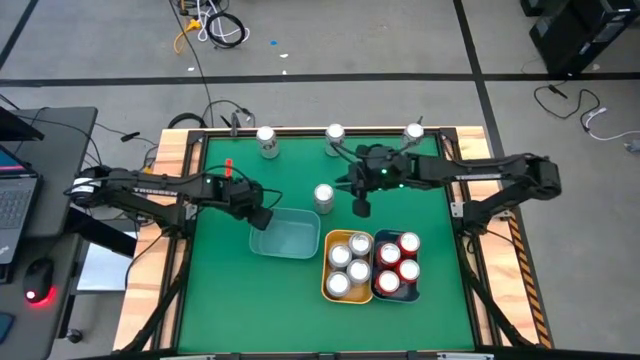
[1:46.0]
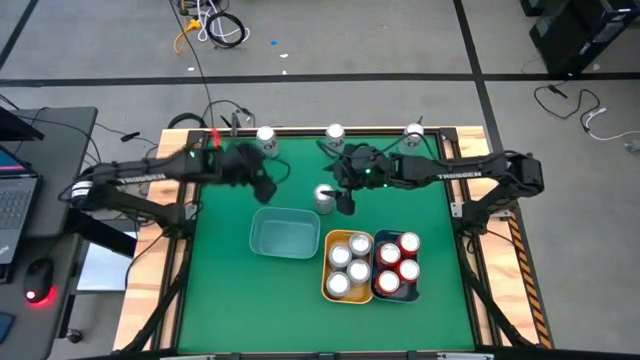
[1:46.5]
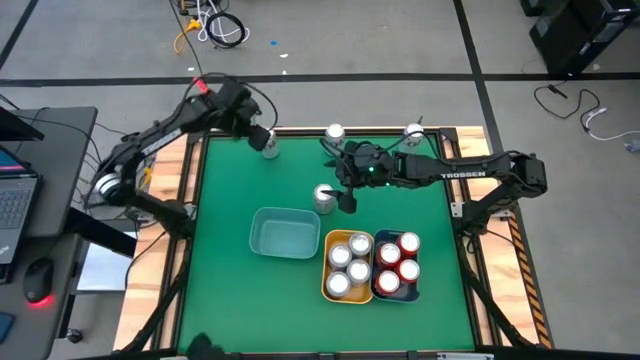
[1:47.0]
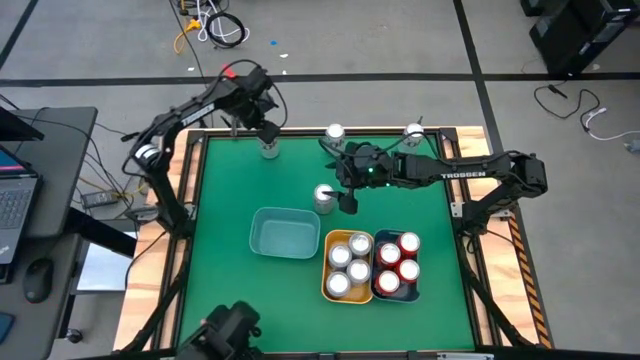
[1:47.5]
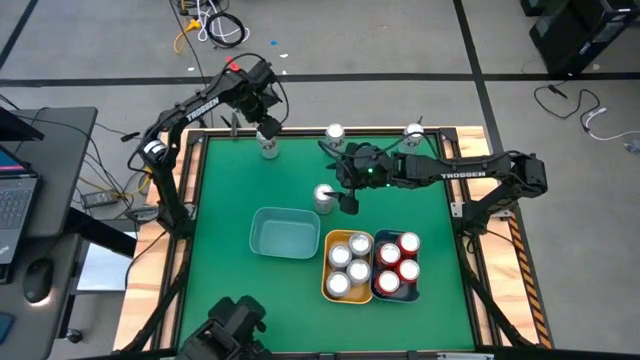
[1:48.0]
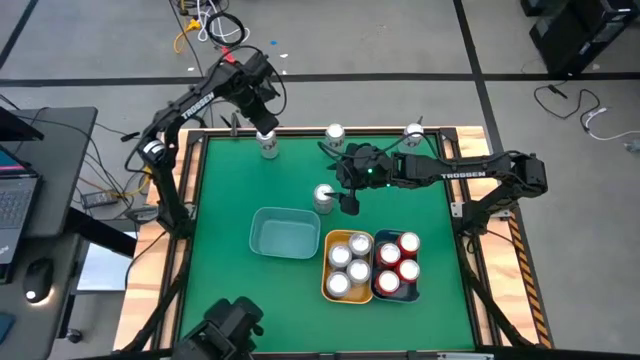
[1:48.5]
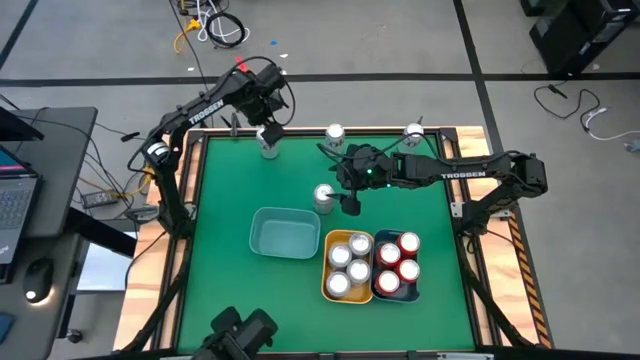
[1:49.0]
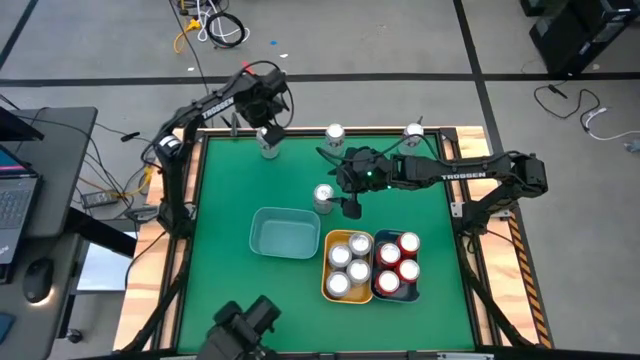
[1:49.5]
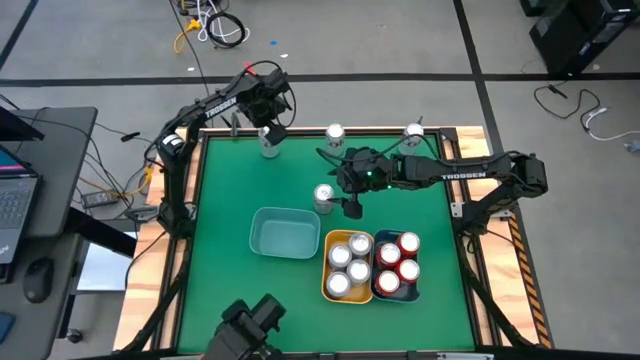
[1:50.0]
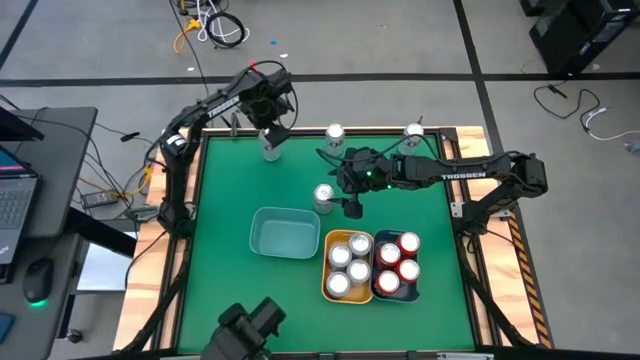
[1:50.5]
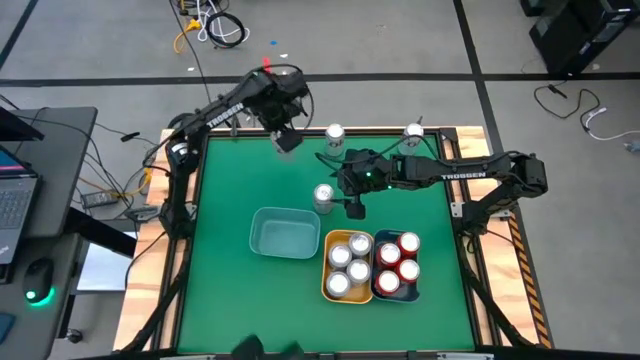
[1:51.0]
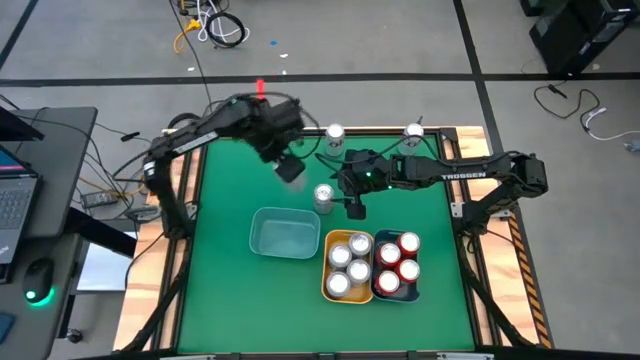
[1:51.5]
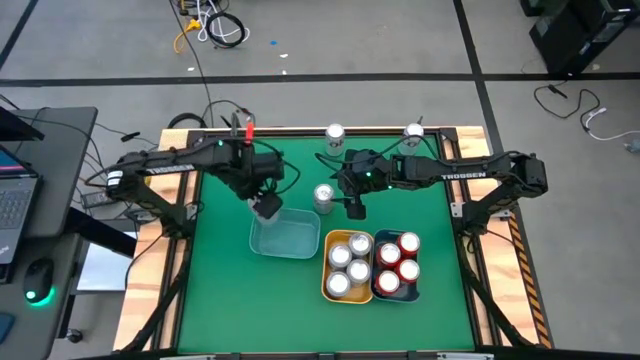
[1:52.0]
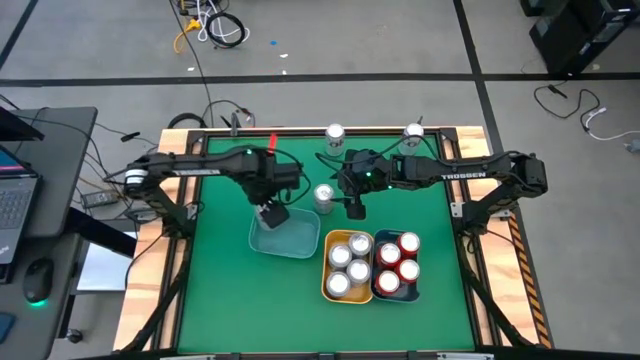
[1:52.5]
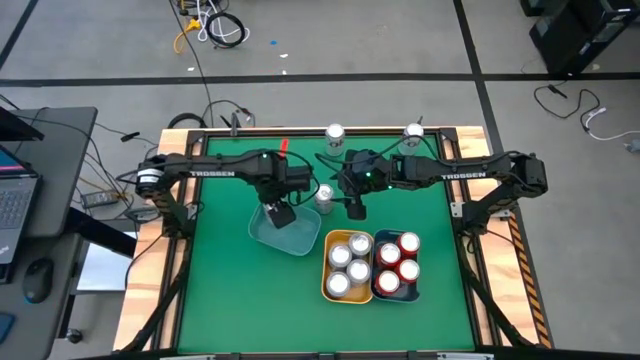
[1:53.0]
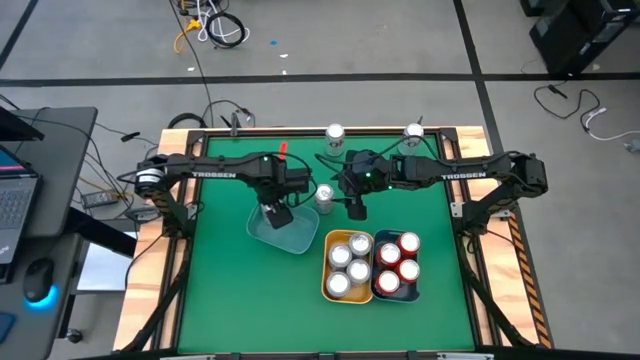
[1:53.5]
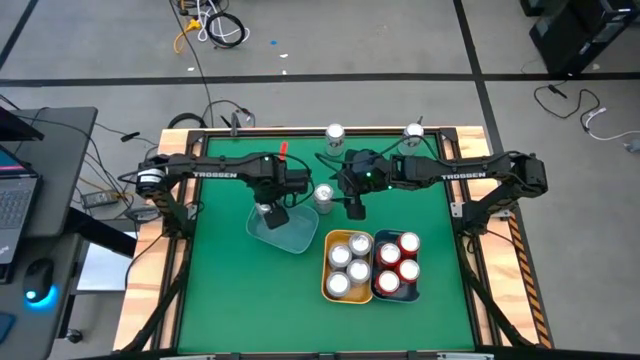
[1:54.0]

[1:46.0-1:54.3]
Task: Sort soda cans
Put the silver soda can into the green bin

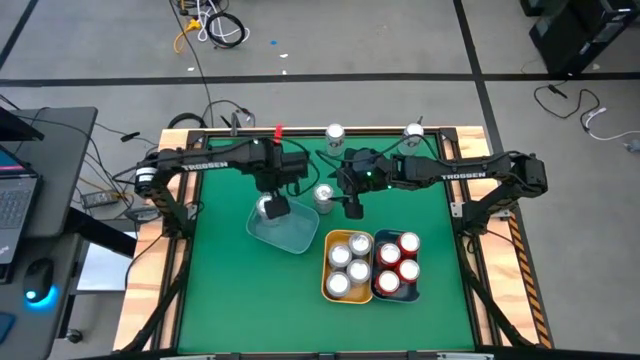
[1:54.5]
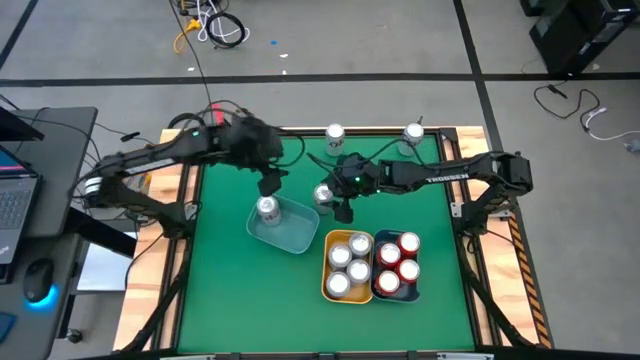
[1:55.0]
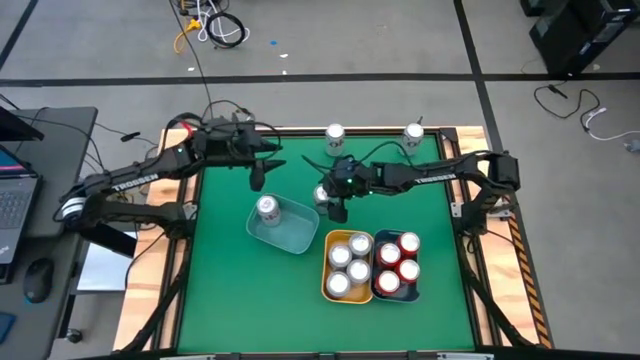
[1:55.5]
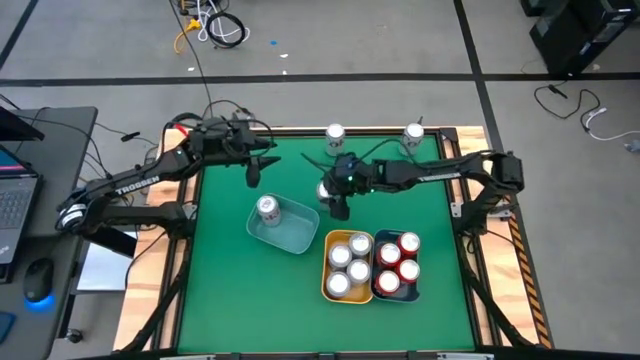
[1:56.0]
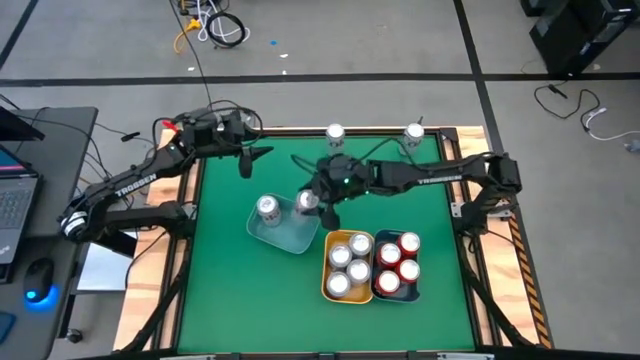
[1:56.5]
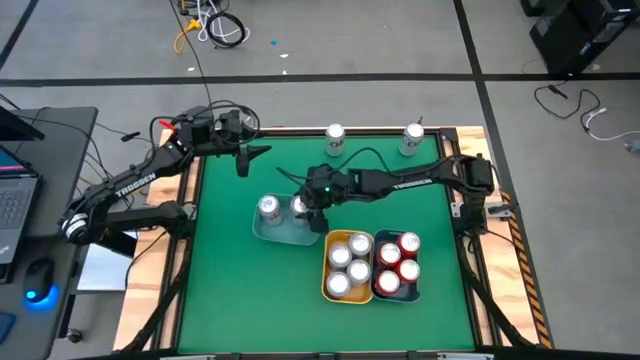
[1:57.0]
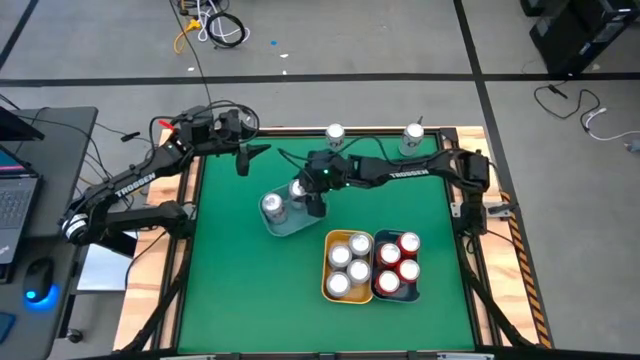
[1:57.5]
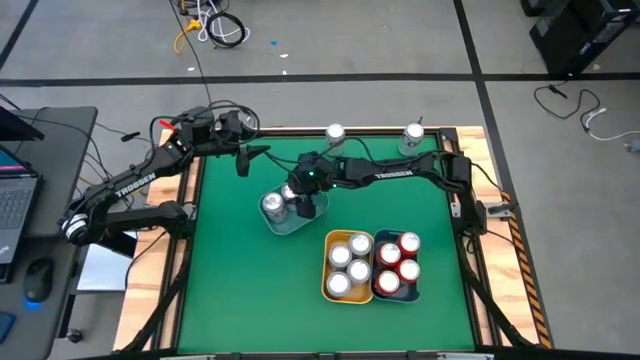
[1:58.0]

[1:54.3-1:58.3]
Put the silver soda can into the green bin

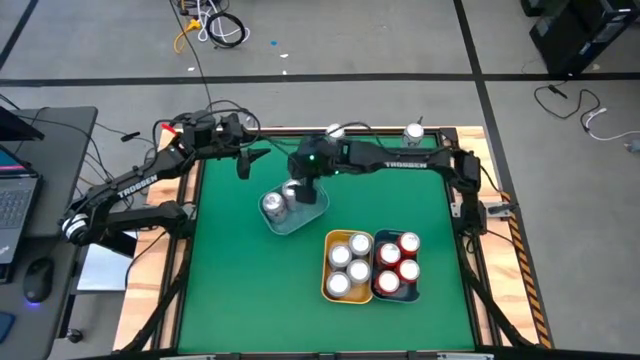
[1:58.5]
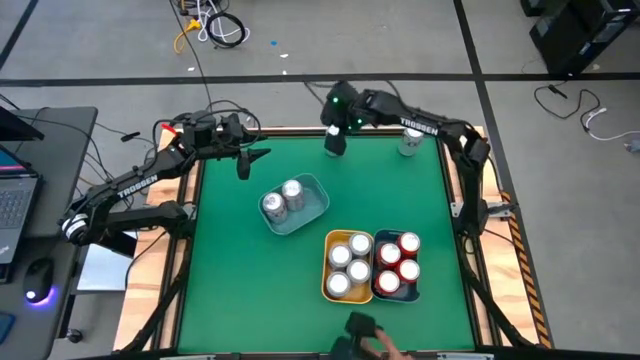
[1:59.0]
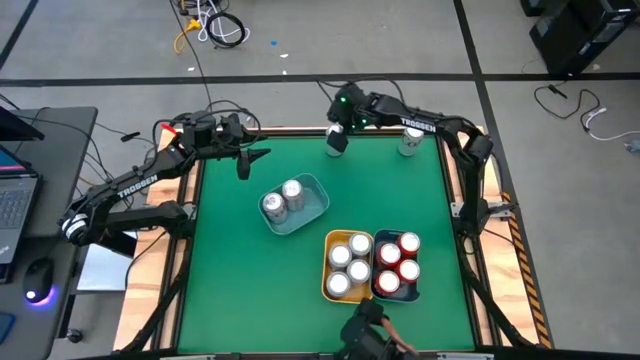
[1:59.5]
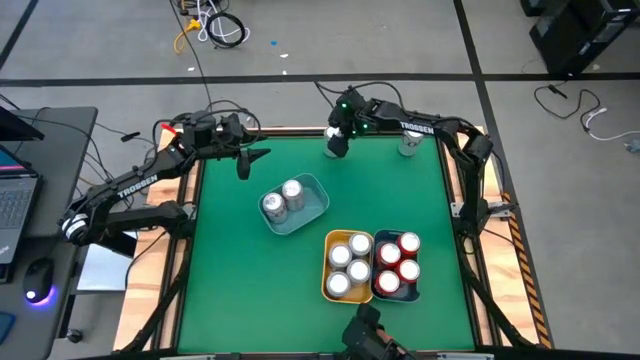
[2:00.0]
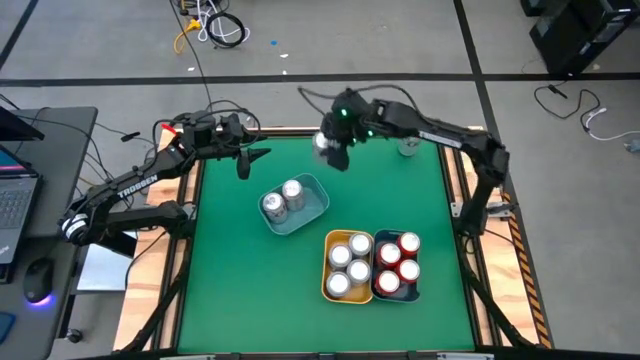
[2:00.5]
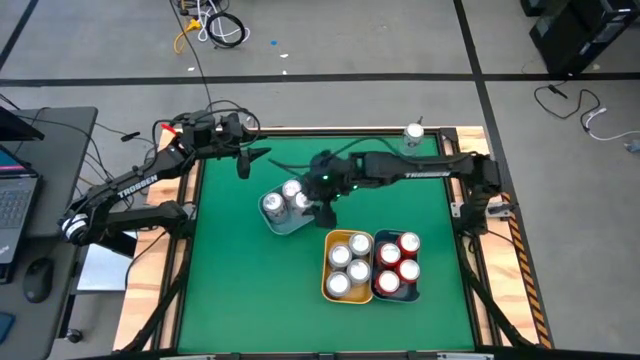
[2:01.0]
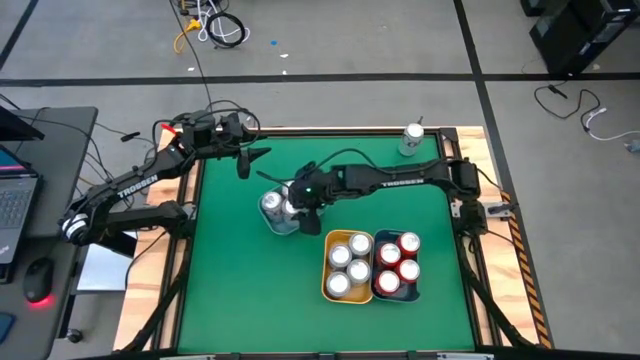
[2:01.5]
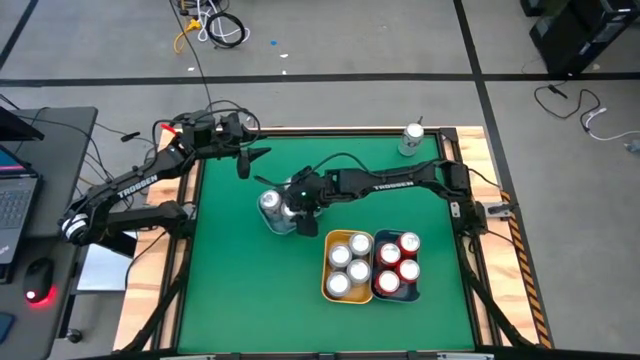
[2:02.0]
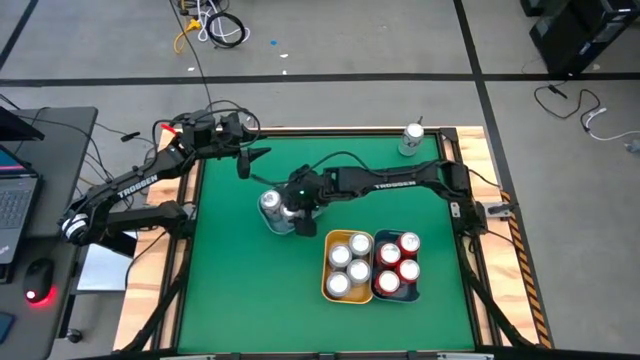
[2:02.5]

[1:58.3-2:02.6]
Put the silver soda can into the green bin

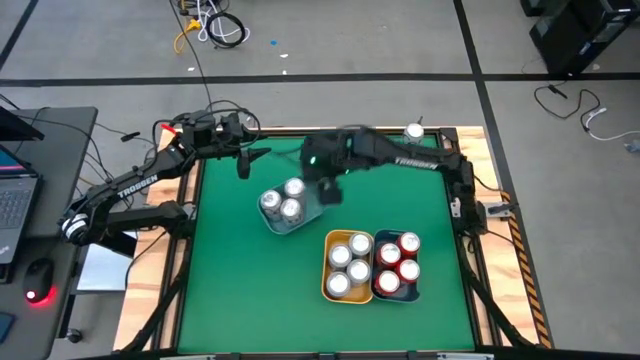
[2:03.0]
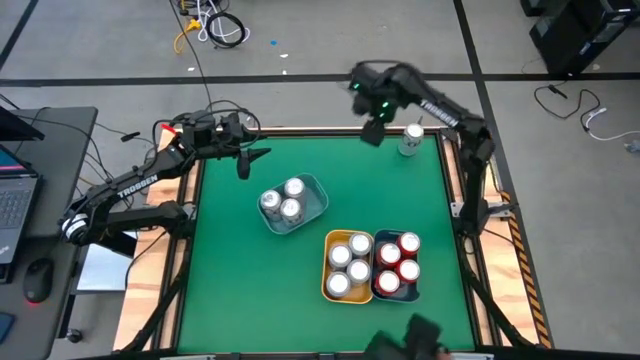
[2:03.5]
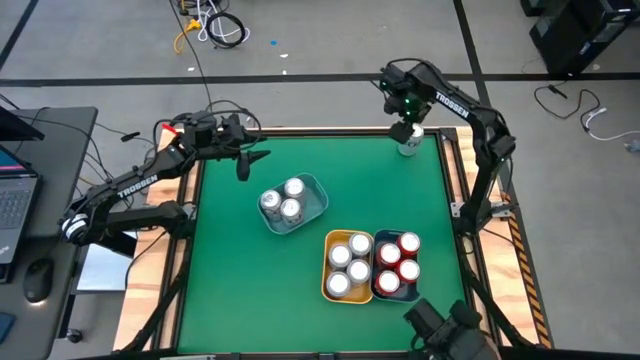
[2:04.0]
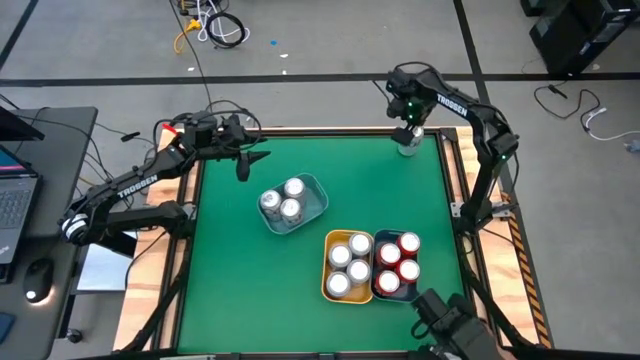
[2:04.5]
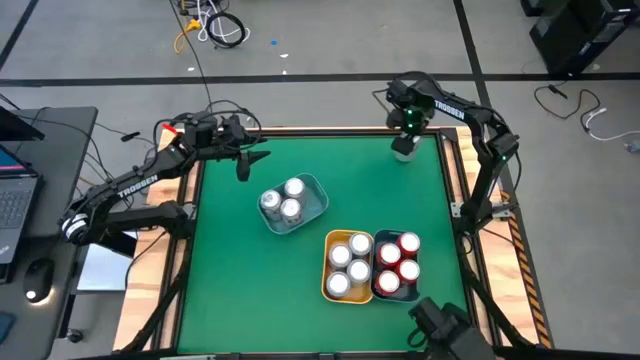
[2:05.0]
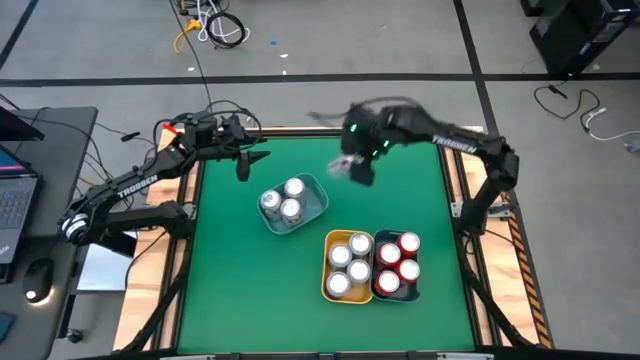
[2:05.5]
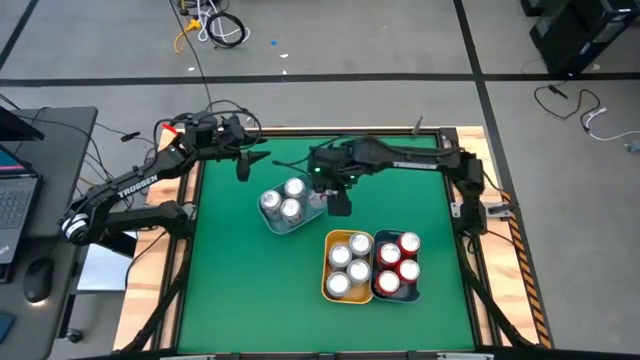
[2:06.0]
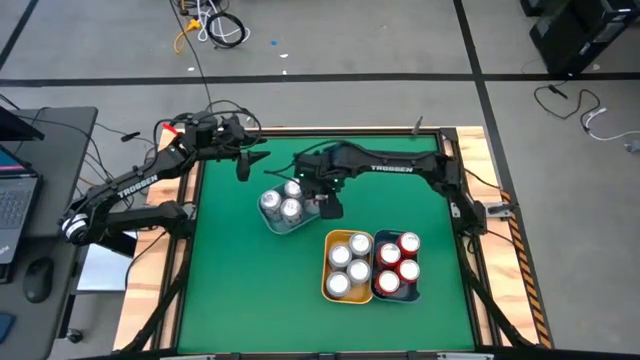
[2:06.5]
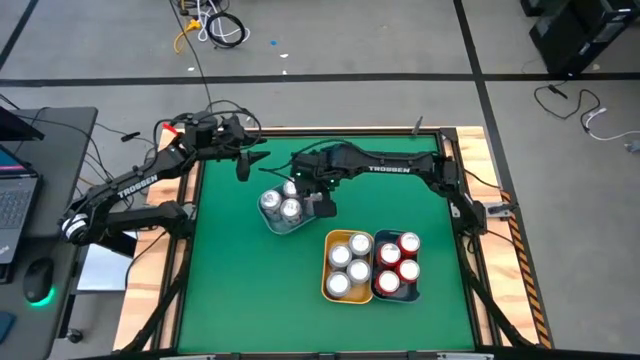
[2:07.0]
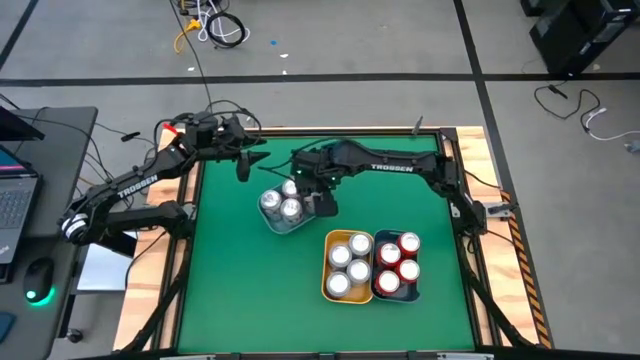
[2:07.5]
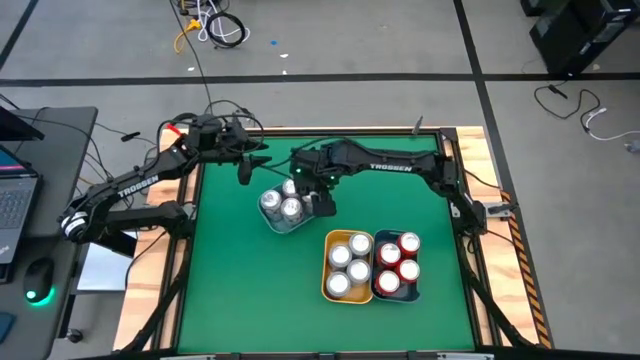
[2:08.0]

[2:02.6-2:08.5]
Put the silver soda can into the green bin
